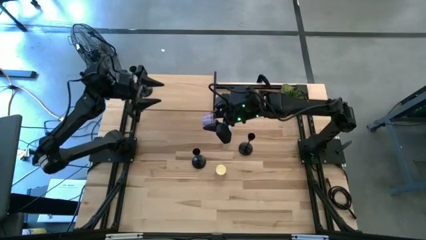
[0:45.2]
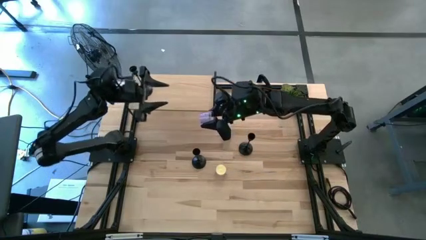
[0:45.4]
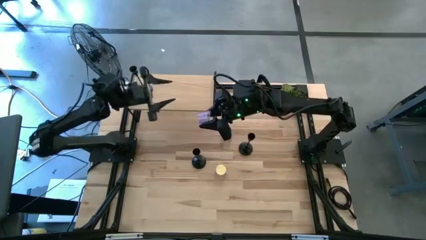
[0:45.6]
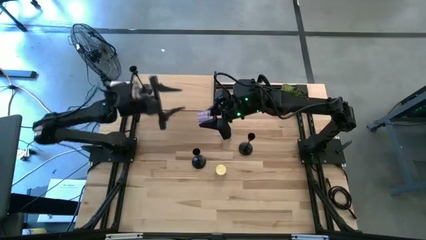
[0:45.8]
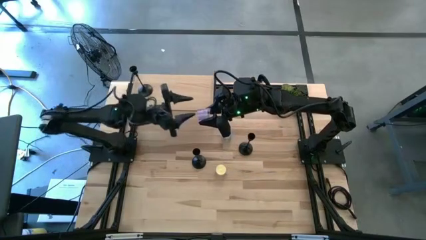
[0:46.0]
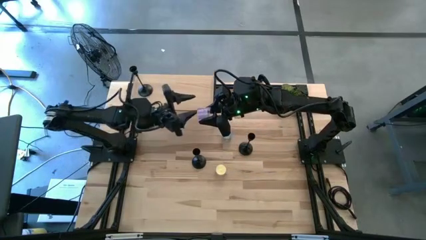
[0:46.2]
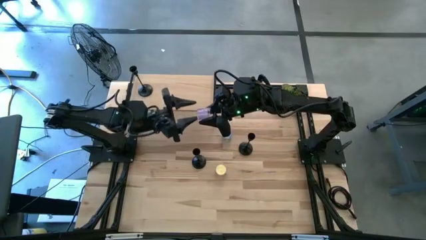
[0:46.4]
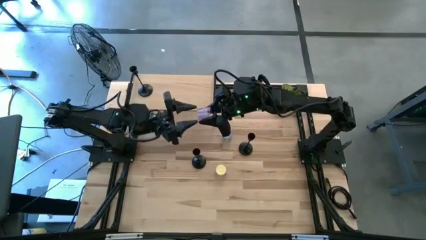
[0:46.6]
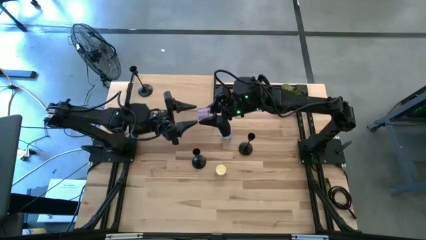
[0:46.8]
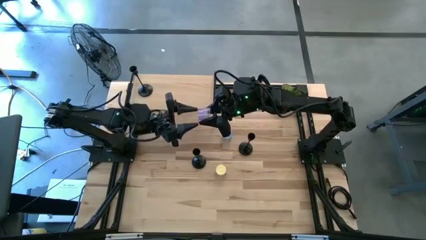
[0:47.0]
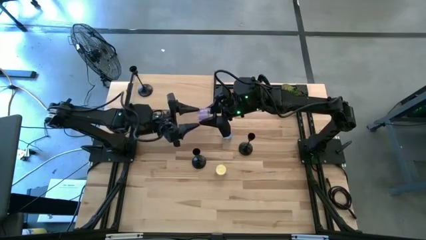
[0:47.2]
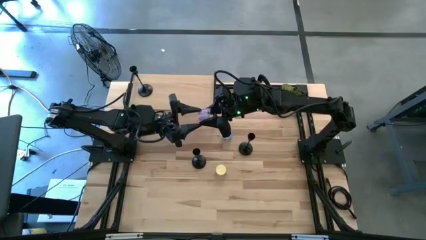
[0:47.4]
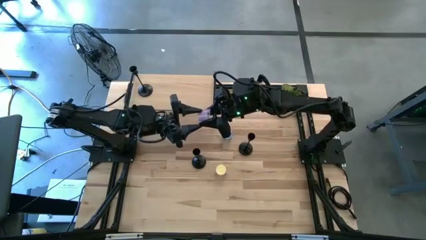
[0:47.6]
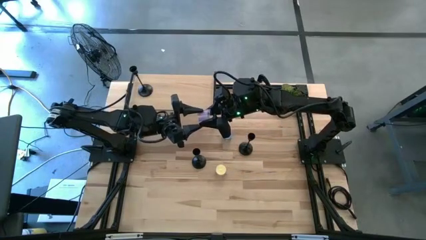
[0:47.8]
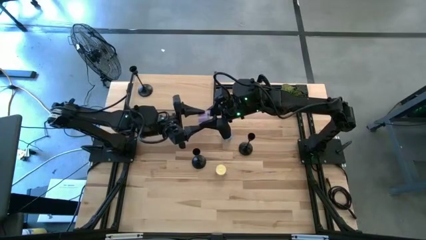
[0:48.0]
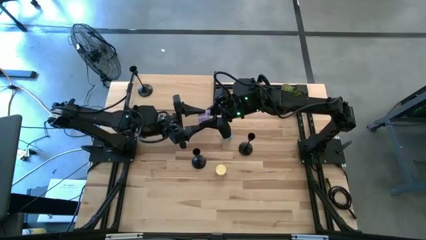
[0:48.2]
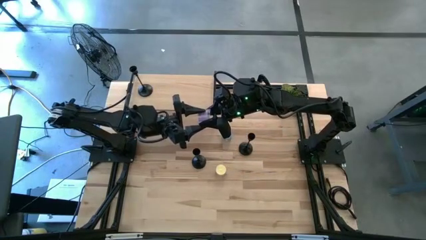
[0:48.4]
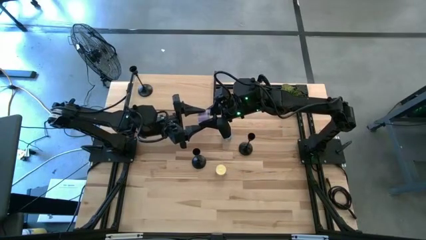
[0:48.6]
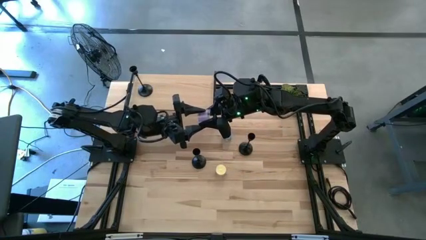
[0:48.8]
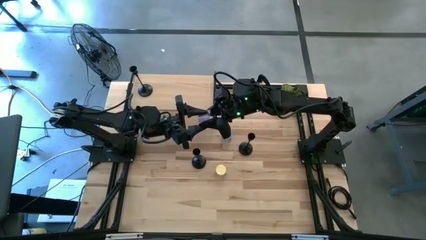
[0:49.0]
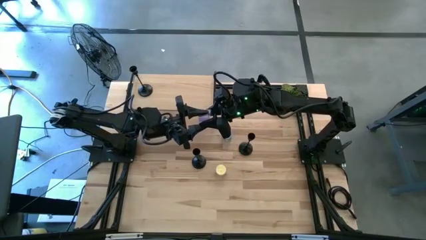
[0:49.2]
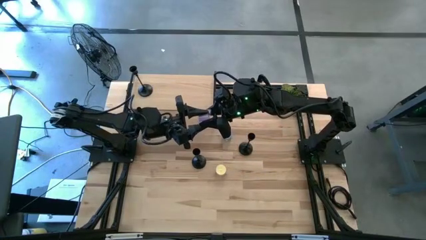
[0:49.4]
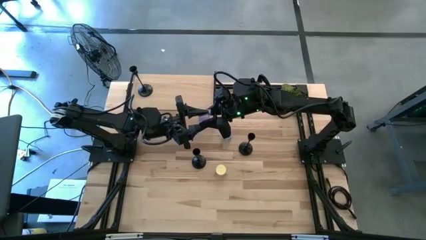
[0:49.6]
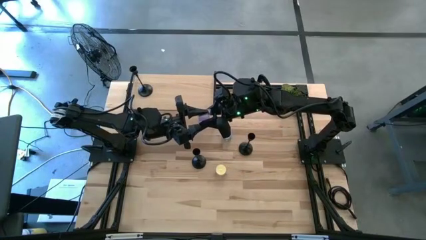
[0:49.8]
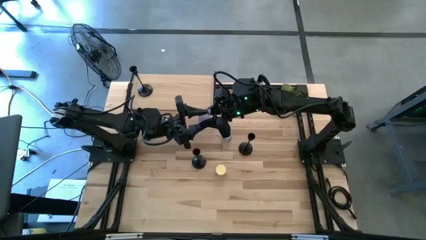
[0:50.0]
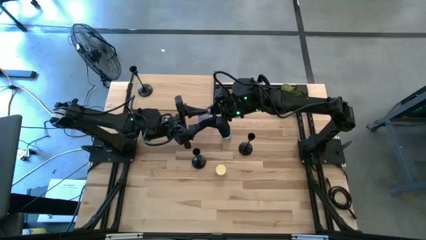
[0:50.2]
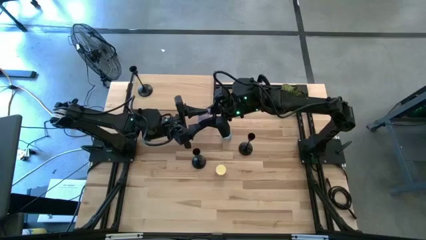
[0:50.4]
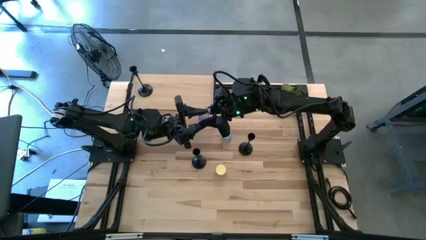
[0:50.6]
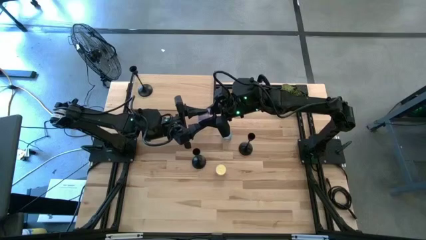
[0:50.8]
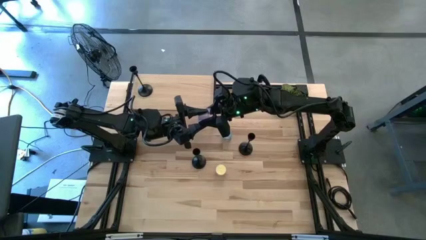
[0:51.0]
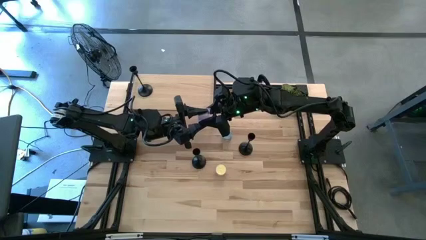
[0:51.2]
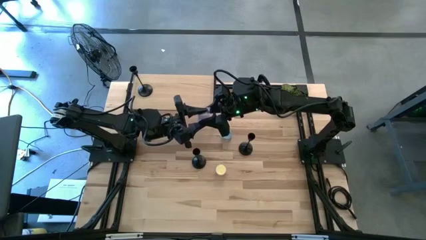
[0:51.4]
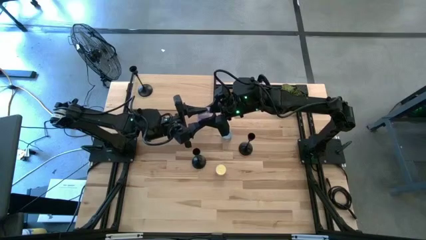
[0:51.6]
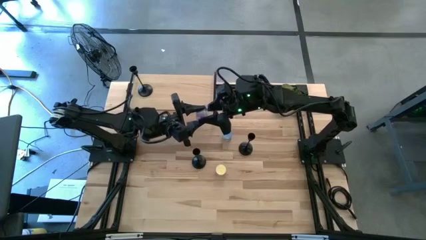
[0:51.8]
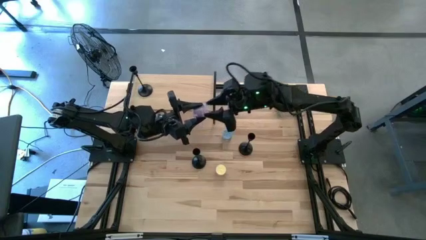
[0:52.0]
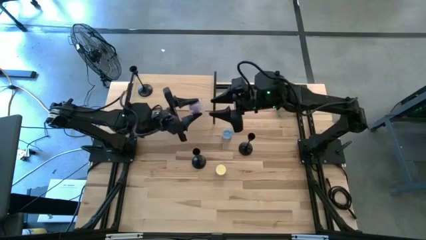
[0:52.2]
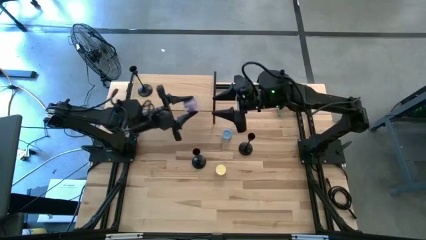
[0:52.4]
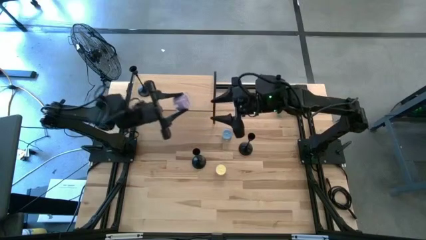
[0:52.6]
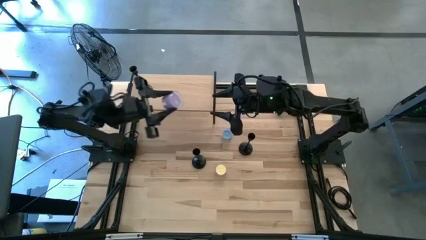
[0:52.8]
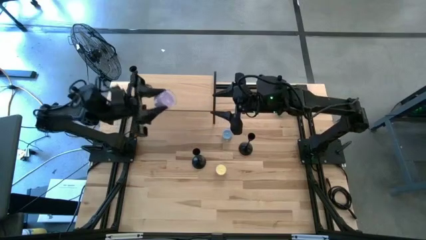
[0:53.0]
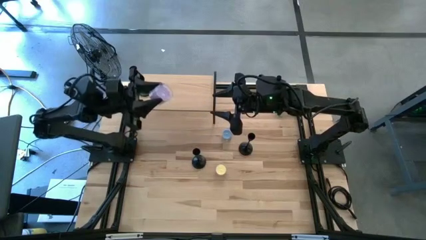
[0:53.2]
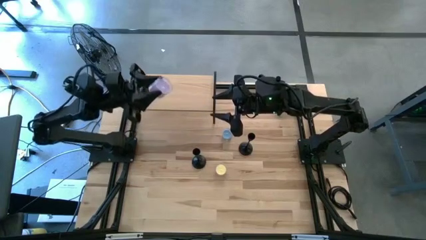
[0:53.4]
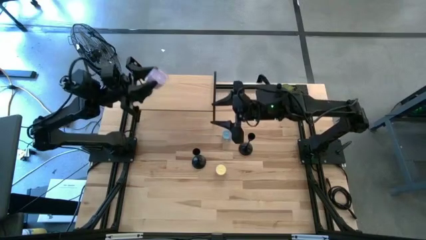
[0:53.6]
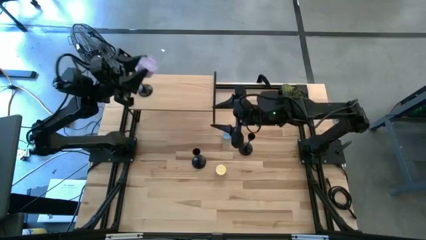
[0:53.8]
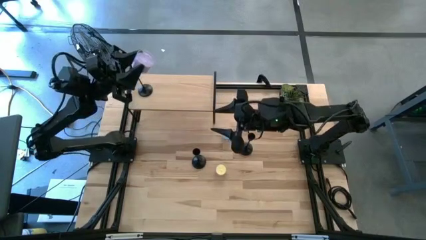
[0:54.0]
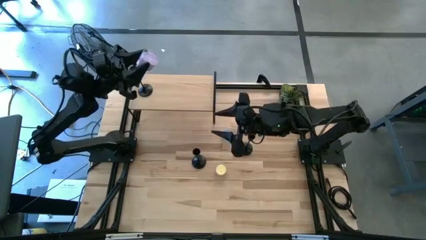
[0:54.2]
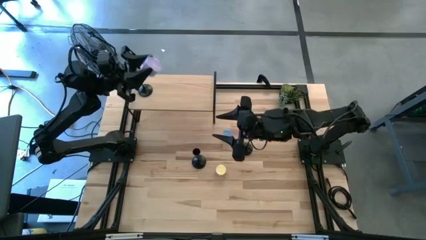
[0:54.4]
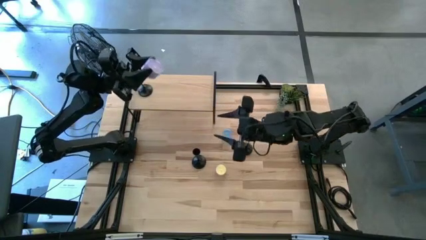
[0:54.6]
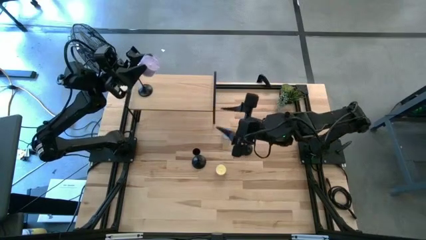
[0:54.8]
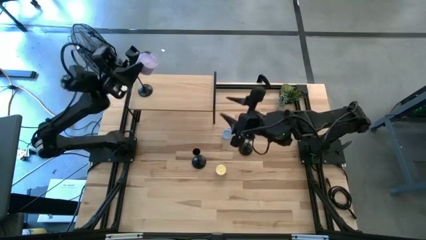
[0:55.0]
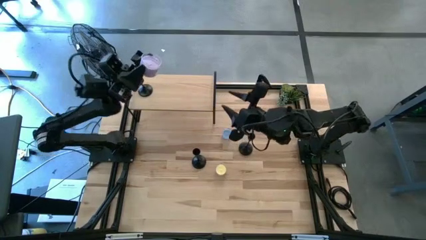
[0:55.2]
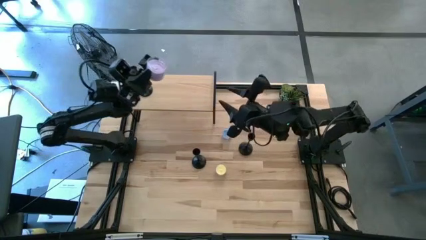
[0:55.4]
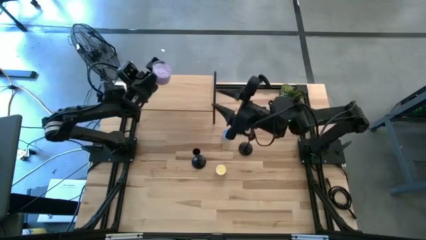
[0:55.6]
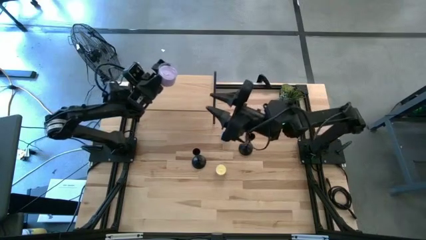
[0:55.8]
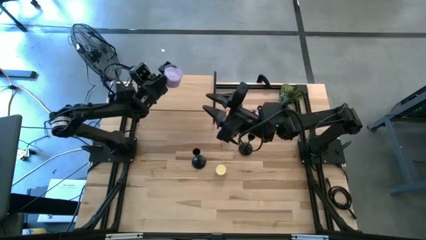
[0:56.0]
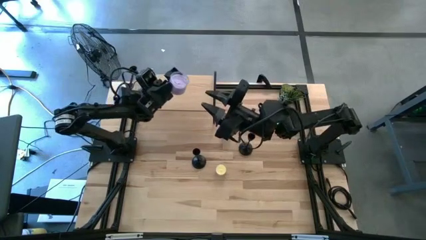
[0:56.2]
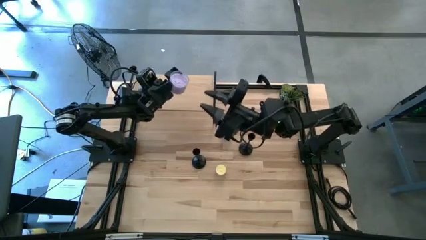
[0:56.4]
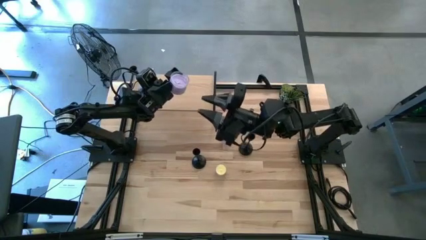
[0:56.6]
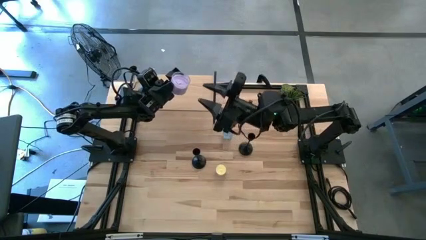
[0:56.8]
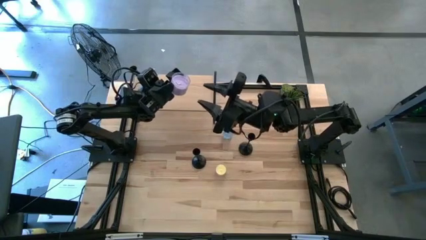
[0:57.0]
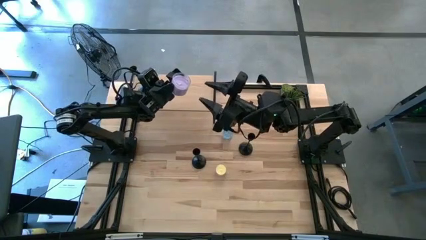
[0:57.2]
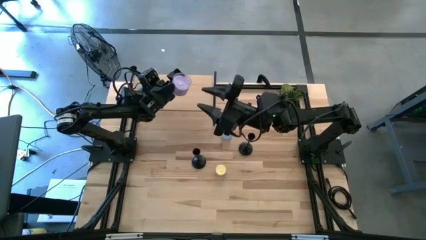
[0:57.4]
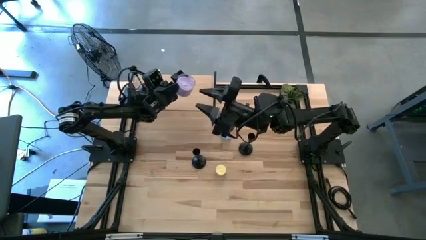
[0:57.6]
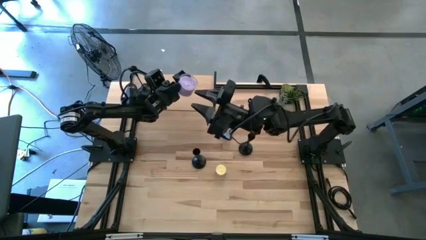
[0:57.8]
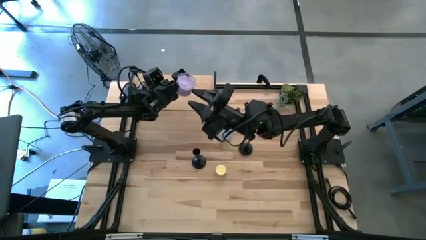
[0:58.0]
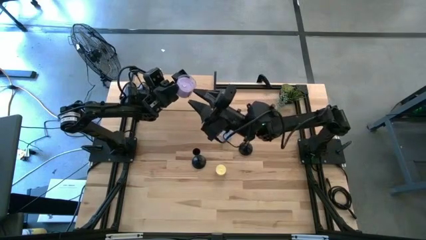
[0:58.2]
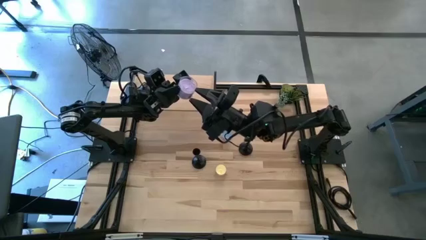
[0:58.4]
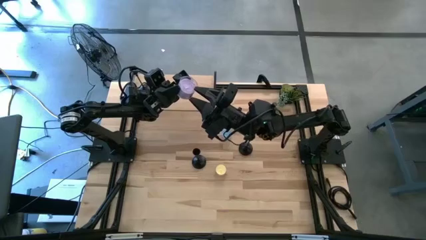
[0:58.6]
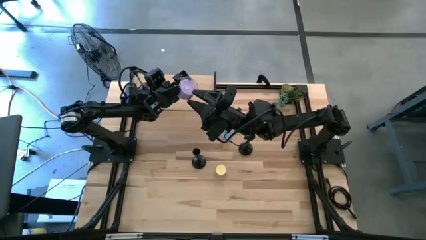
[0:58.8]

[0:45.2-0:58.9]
Task: Pick & Place candle stick holders
Put the purple candle on the shelf

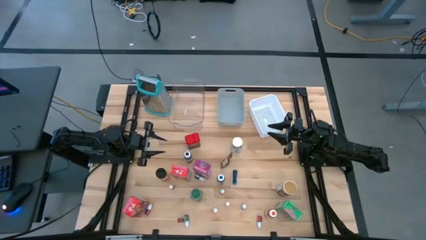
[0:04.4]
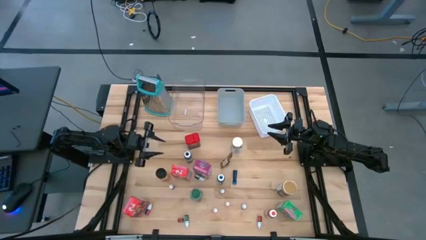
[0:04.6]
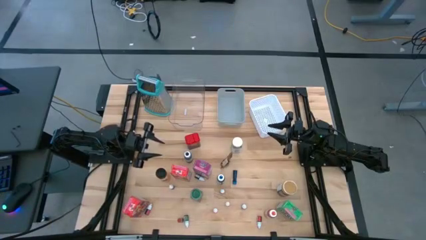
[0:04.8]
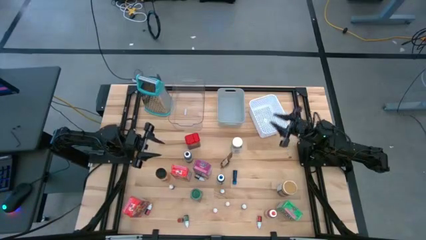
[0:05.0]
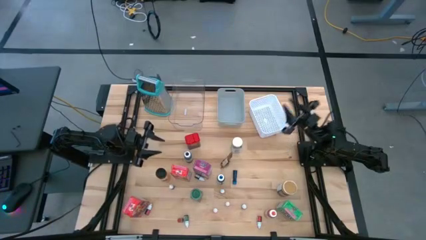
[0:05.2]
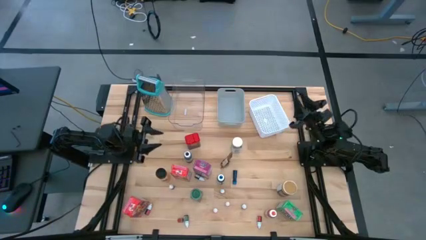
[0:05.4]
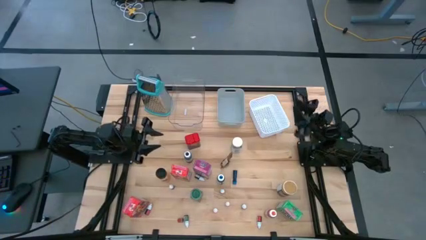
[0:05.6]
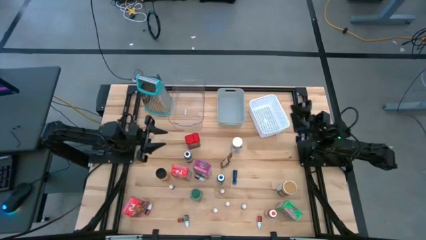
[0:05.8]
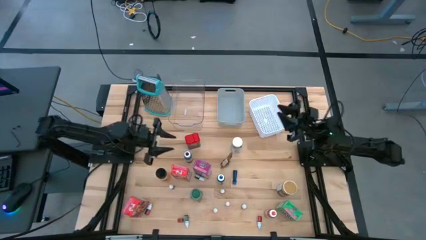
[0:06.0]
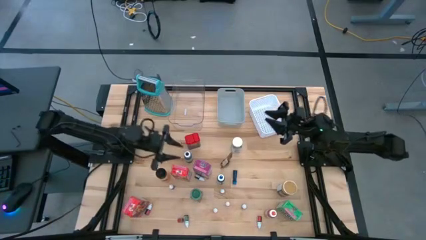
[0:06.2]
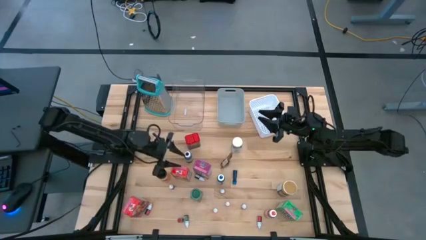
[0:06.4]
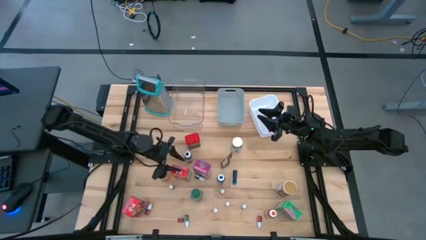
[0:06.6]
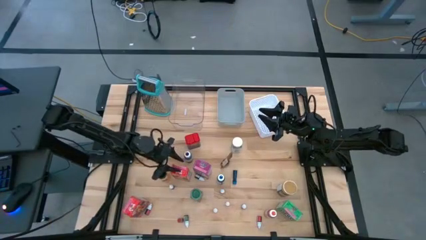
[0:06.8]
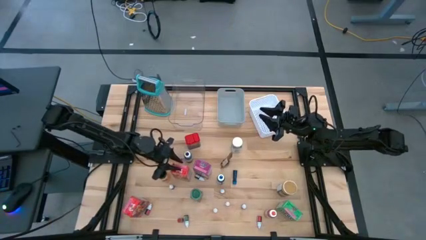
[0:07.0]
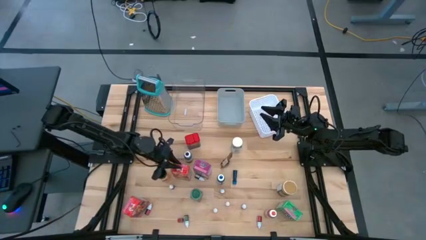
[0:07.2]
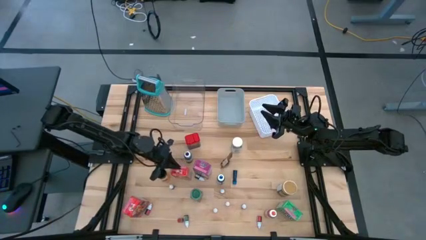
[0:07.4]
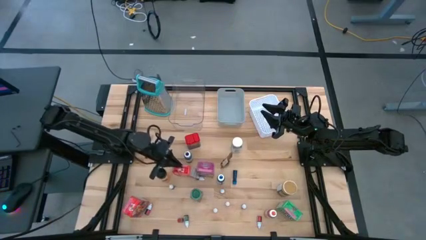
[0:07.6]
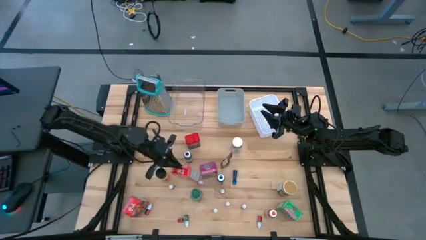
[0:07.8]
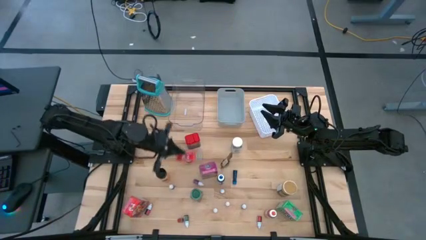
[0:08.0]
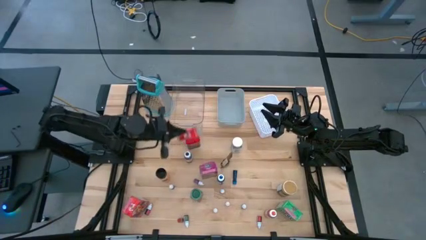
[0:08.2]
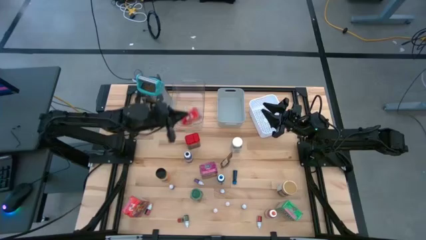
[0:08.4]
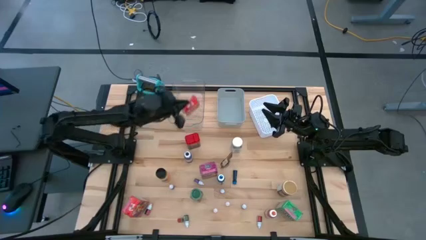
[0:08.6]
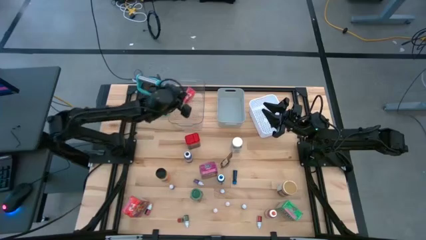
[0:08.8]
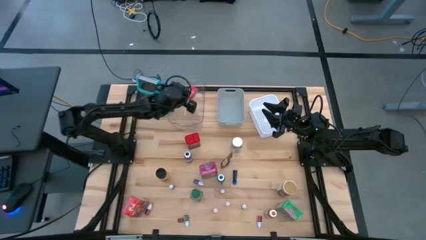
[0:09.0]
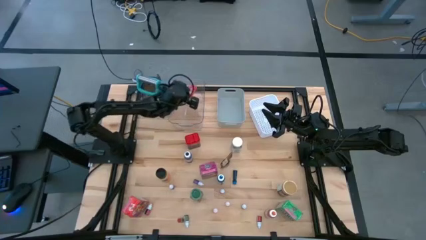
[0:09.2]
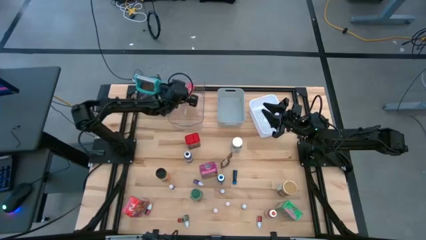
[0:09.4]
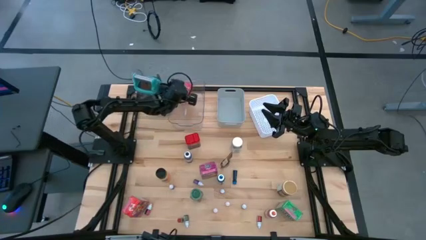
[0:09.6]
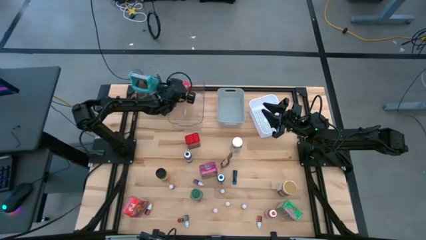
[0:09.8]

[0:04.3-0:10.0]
Task: Pick & Place Kitchen Items
Put the top red cereal box into the transparent bin
